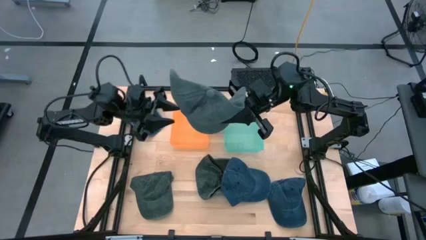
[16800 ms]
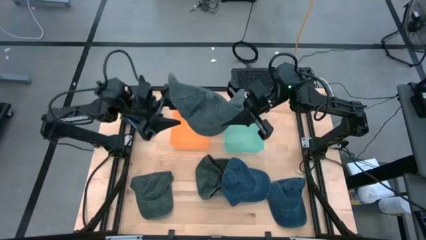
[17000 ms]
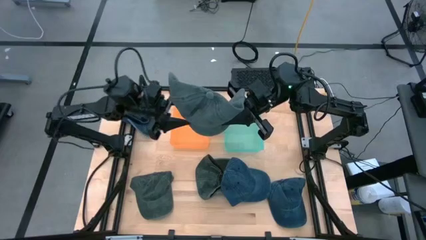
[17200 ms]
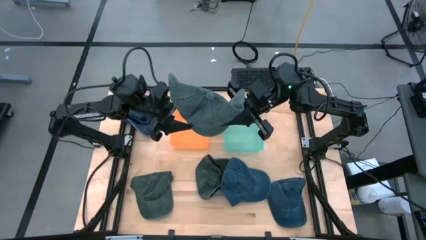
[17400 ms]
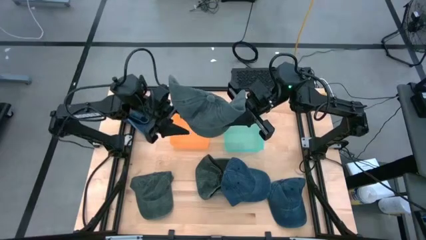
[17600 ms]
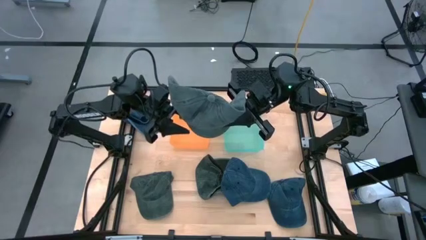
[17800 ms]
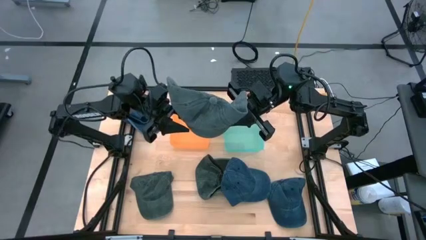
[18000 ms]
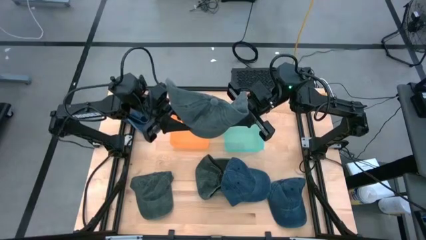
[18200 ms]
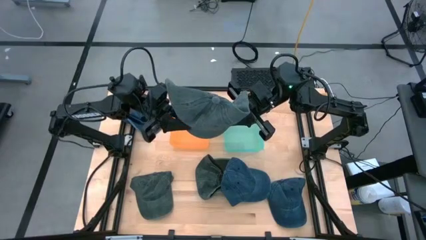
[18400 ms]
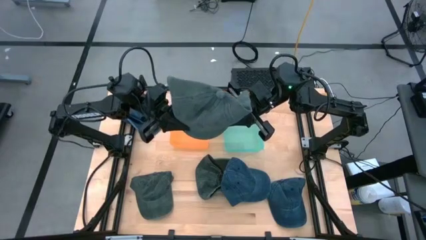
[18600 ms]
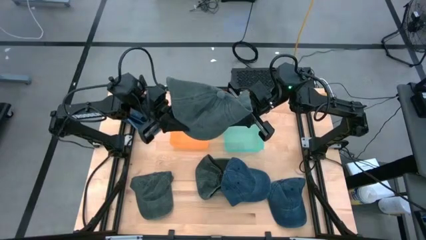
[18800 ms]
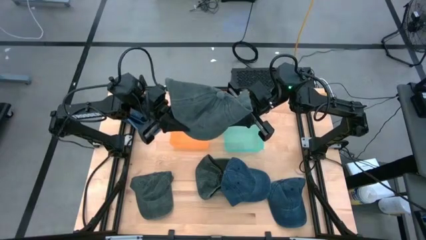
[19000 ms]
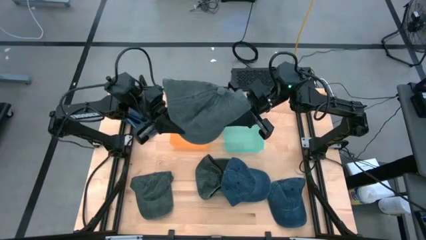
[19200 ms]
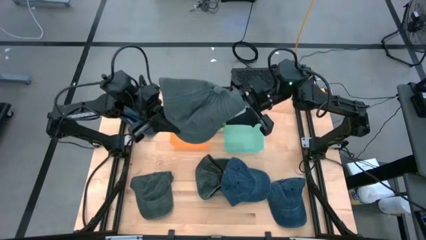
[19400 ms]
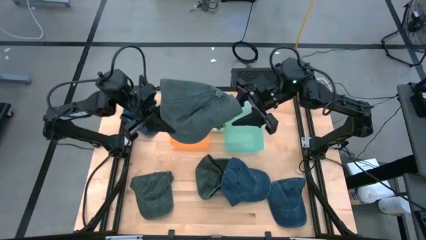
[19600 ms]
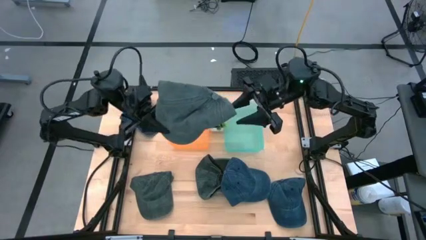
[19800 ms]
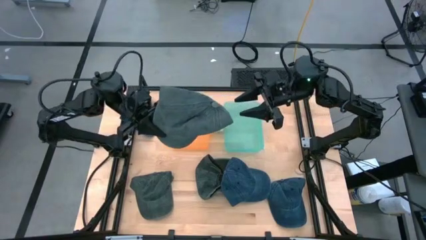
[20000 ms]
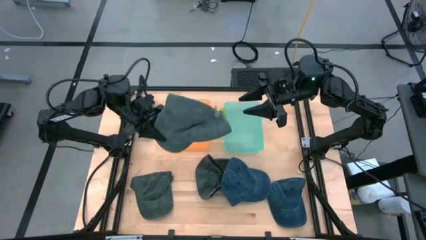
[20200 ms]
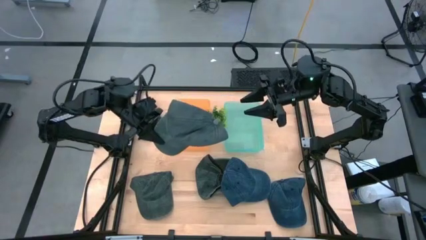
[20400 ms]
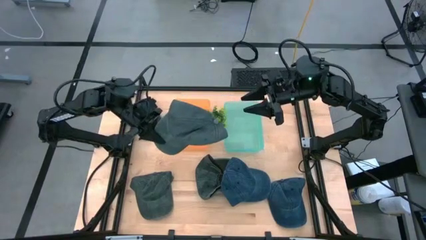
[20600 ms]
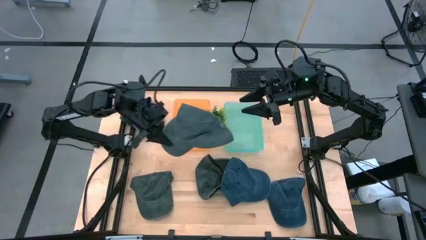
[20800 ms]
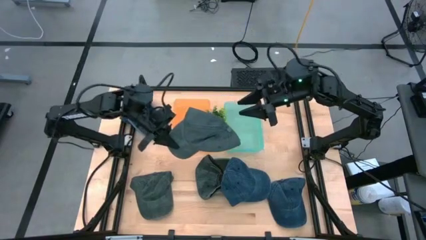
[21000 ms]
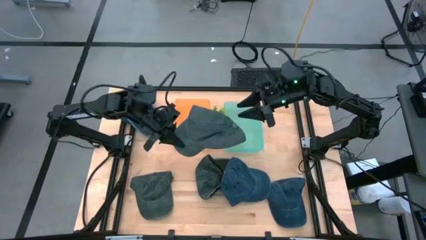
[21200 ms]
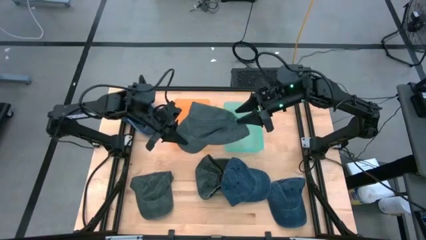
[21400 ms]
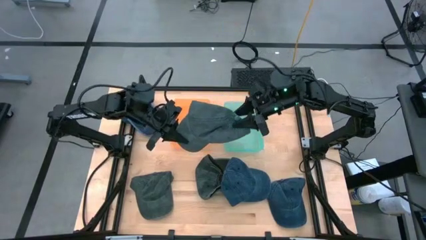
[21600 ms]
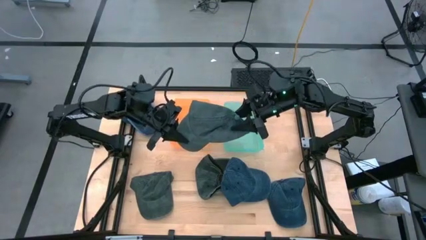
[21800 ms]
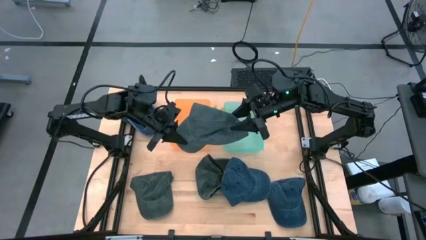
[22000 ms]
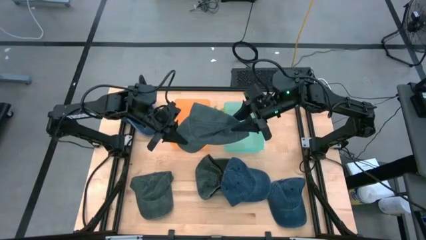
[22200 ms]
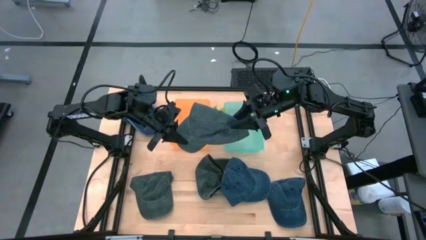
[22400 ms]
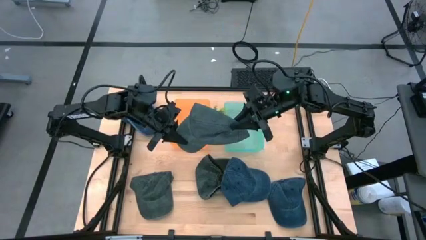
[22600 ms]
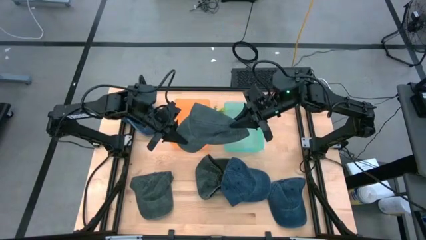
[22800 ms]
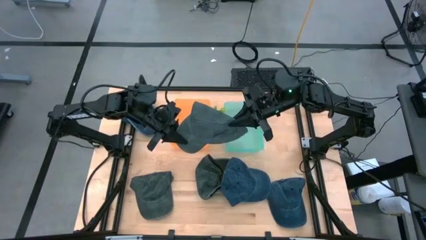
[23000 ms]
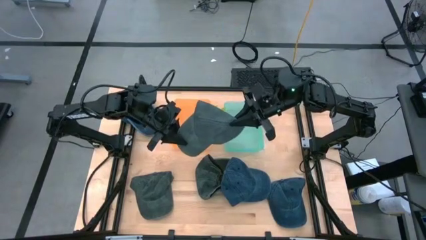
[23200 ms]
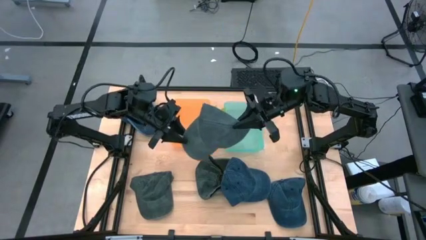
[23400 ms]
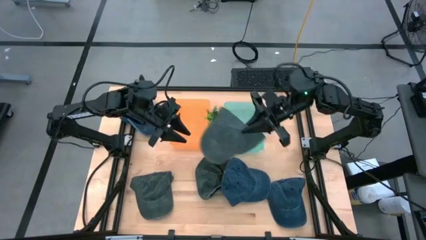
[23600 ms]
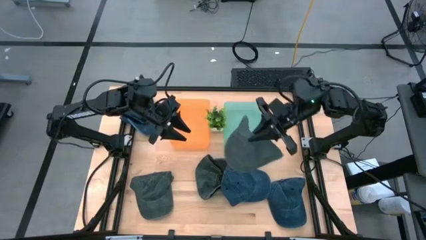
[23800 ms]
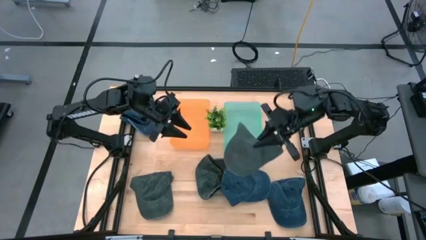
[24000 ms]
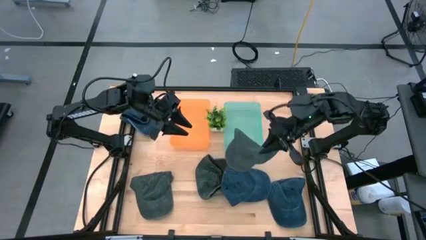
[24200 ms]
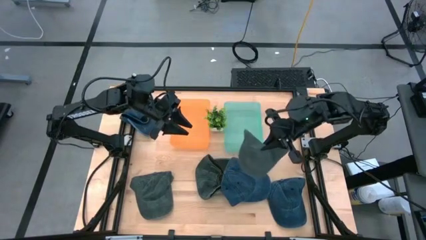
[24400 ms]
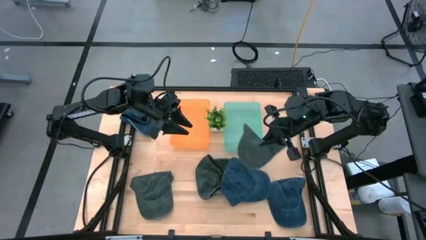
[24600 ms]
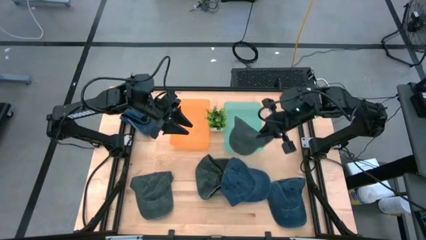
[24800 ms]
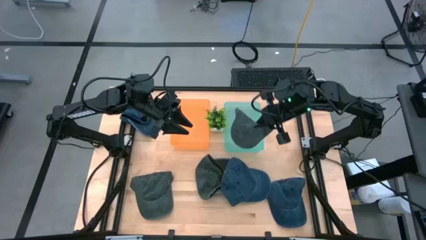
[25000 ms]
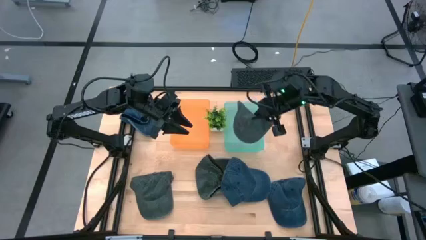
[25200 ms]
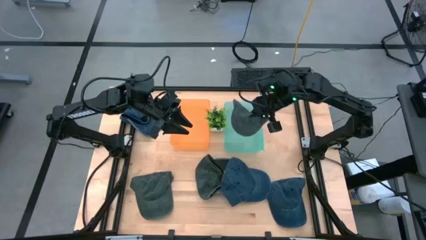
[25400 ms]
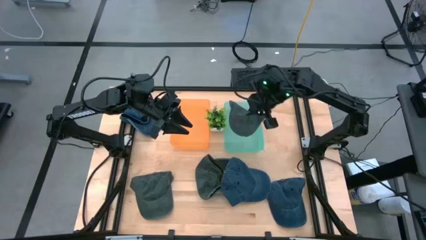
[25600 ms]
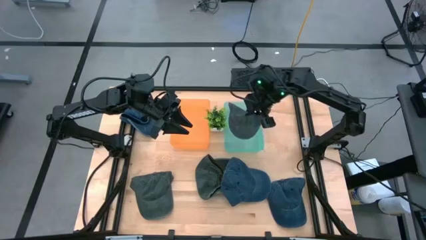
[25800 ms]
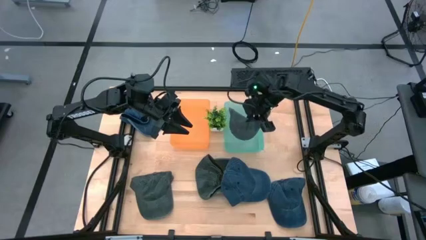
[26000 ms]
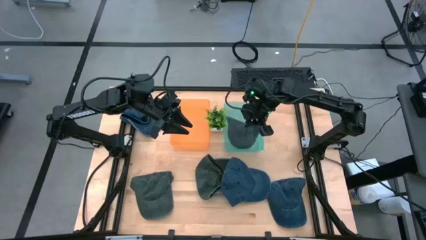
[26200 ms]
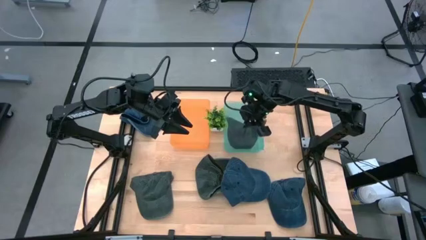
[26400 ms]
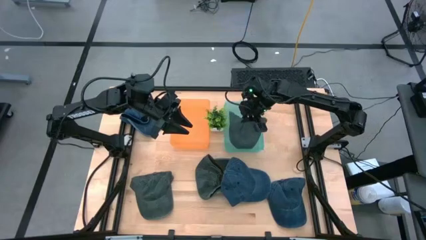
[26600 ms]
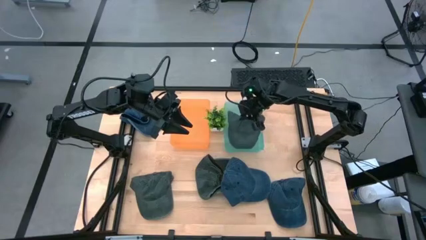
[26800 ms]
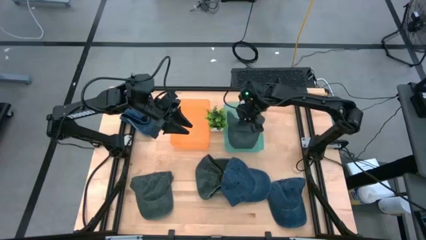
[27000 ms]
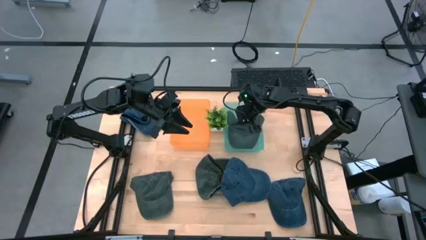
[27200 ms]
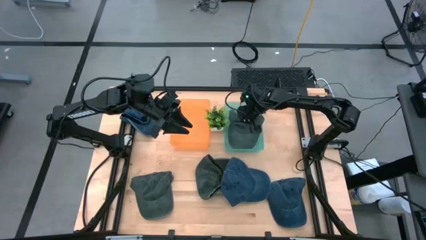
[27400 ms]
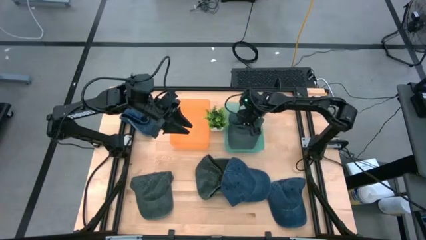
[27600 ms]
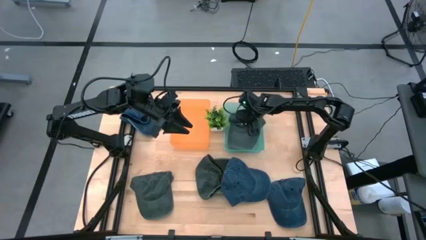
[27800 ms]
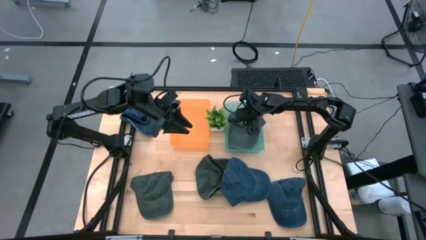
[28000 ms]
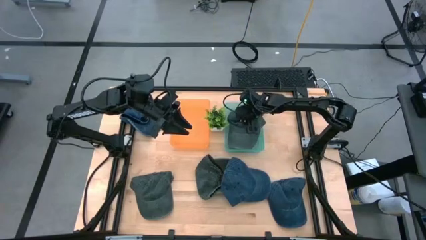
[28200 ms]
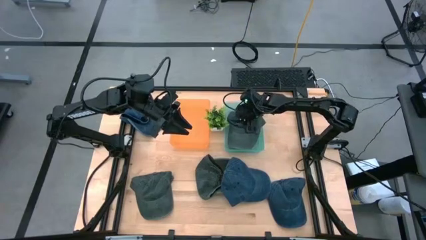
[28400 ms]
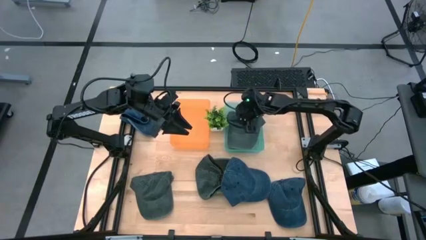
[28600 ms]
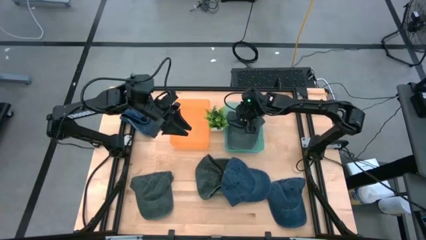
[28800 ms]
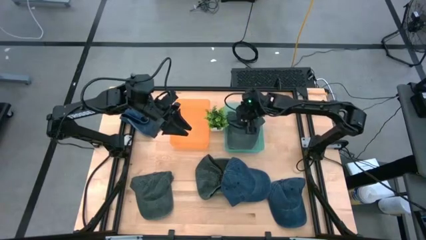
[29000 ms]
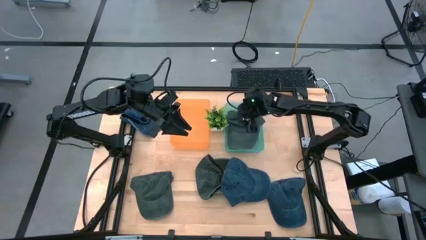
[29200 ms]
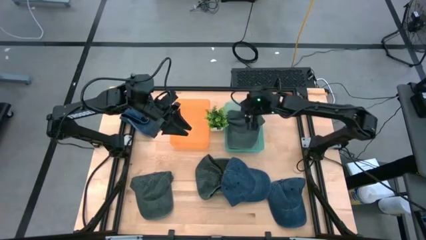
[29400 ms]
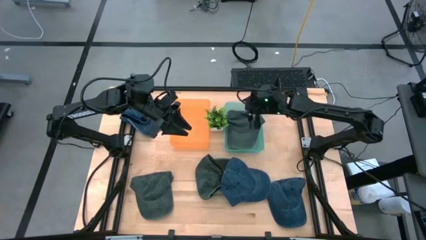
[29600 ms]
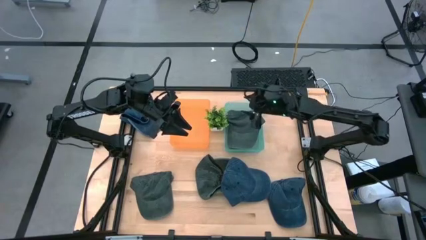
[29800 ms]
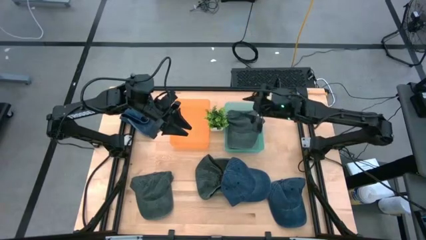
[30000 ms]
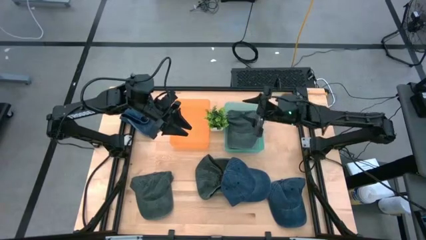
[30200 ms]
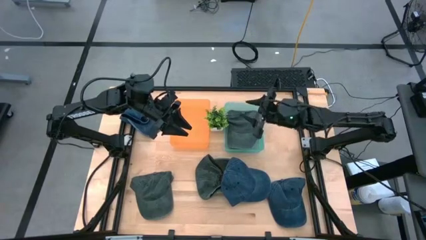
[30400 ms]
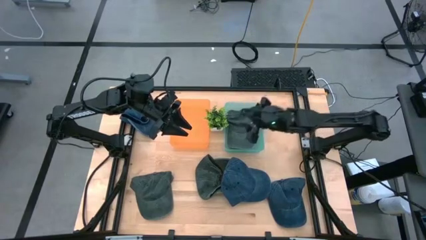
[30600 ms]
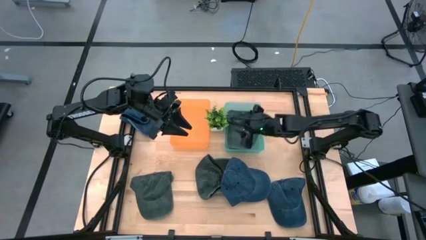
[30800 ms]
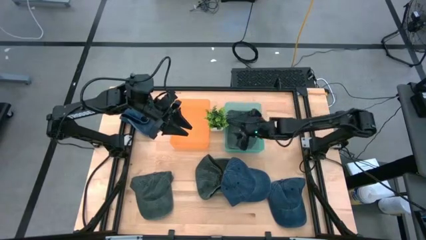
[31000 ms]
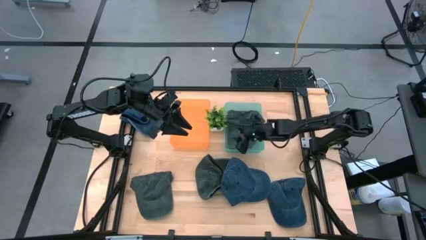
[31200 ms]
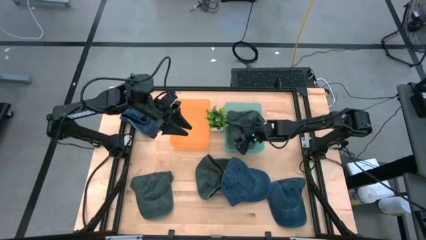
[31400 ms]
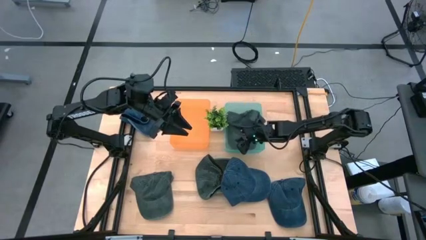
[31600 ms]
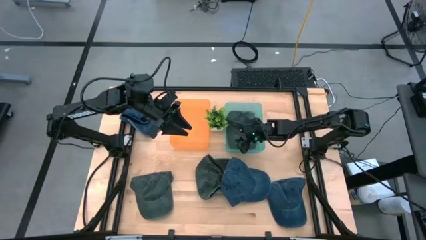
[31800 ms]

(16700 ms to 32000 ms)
Task: Pick & Place hat
Put the top gray cap into the green bin
